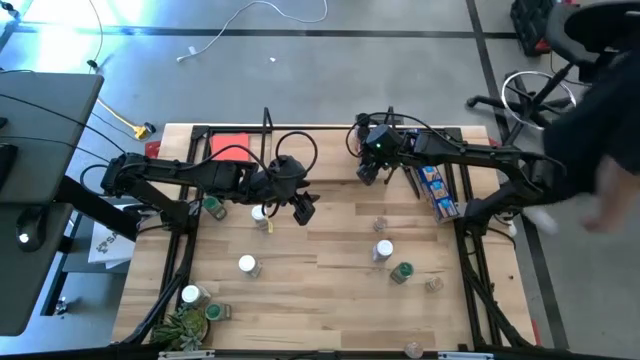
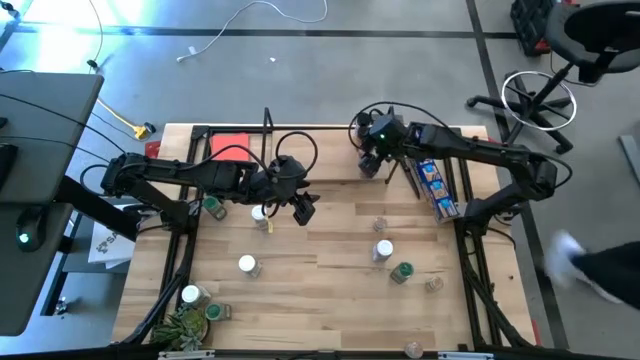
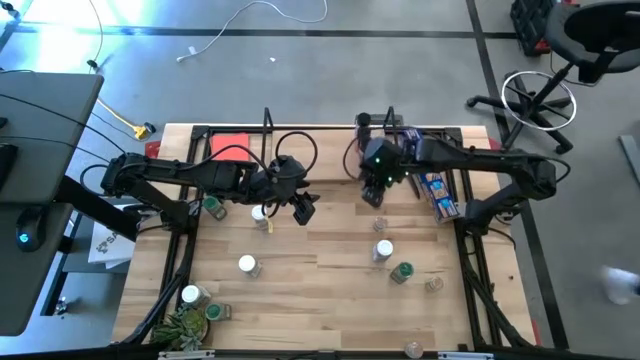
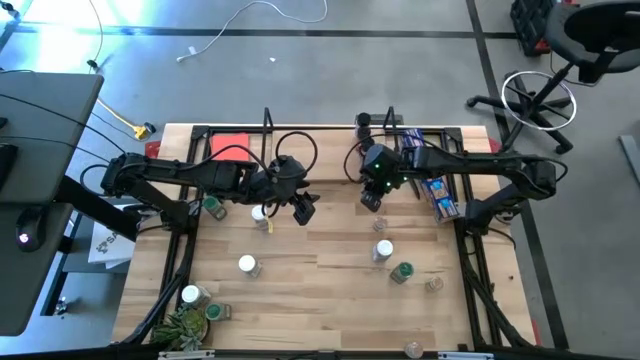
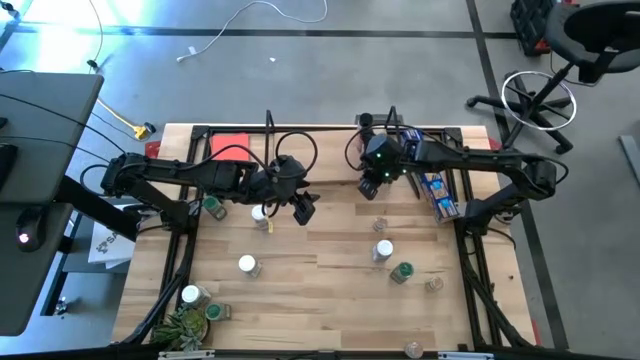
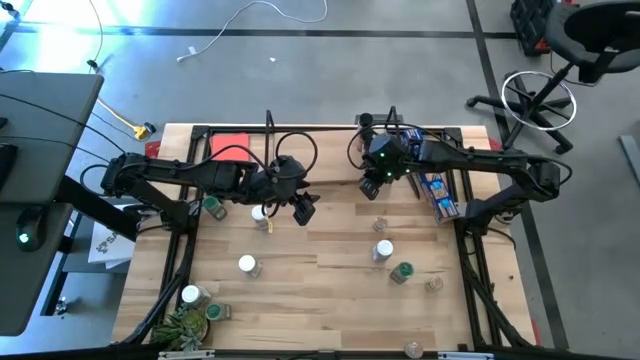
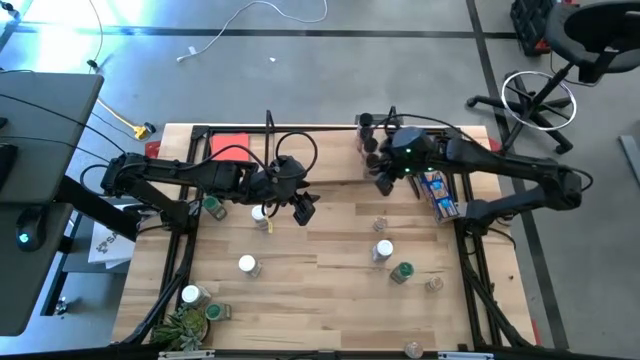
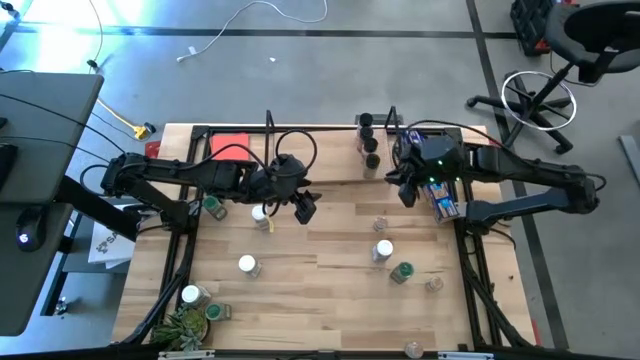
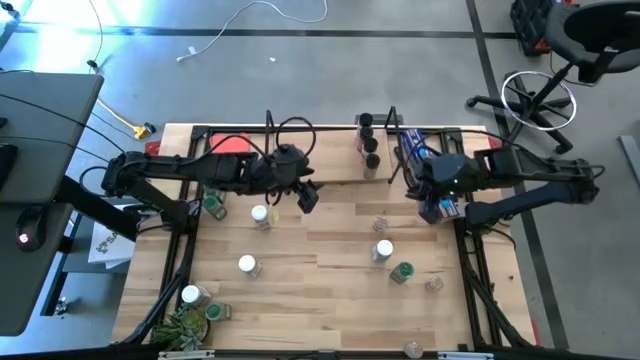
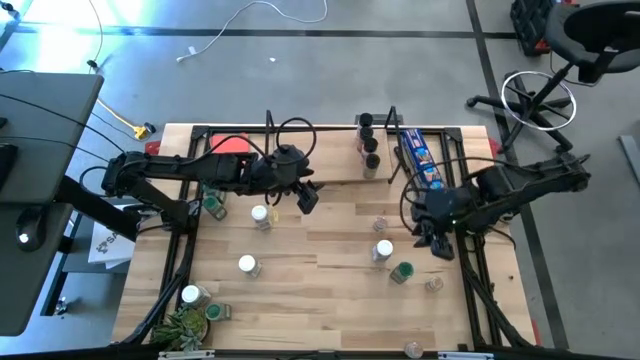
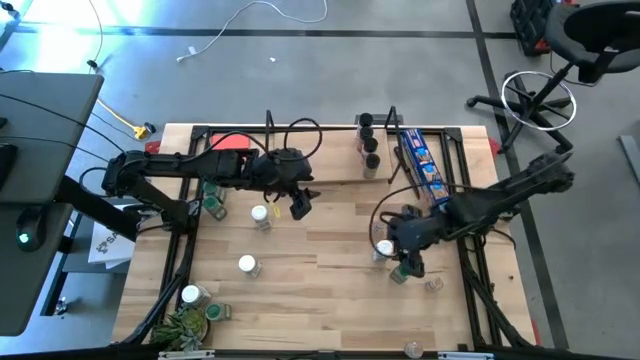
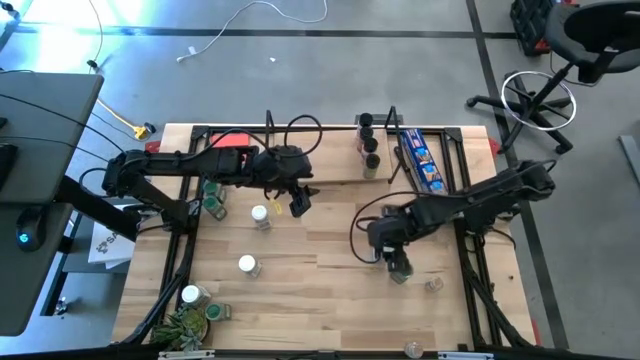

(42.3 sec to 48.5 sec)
Task: Shelf spices
Put the middle right white seasoning bottle on the shelf

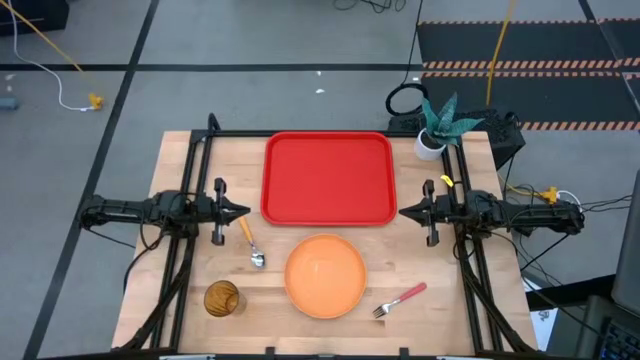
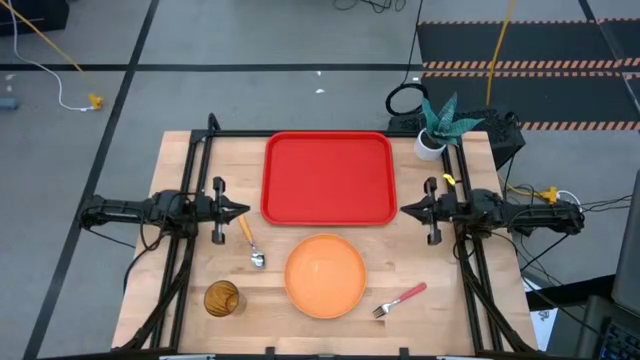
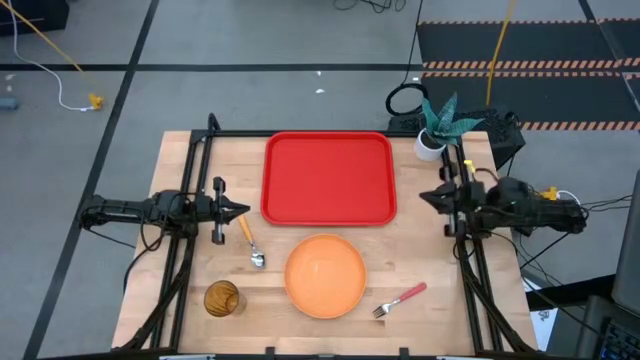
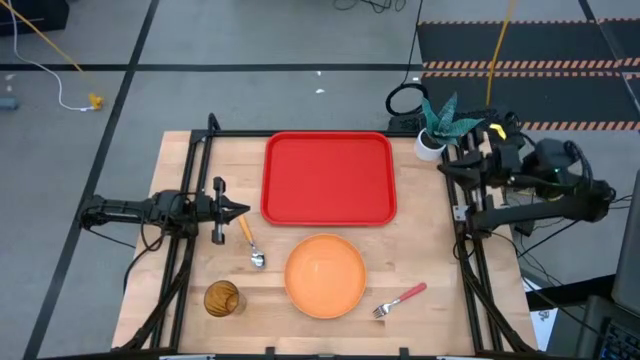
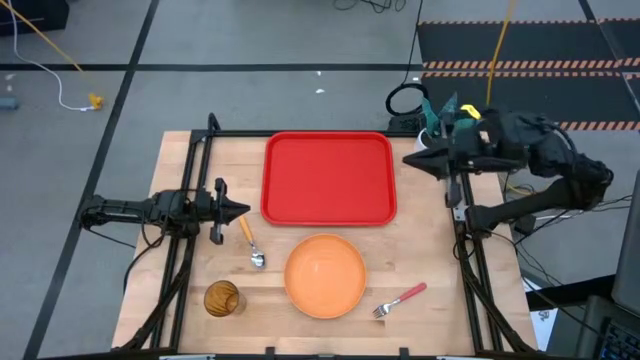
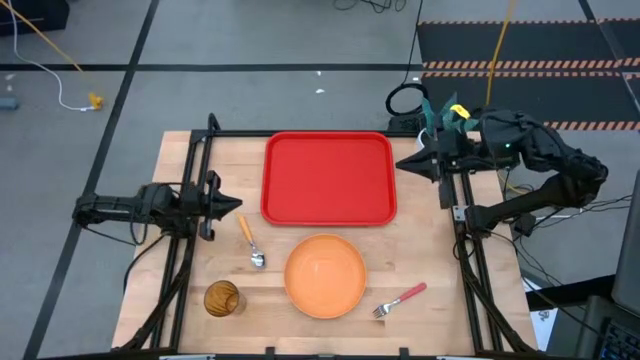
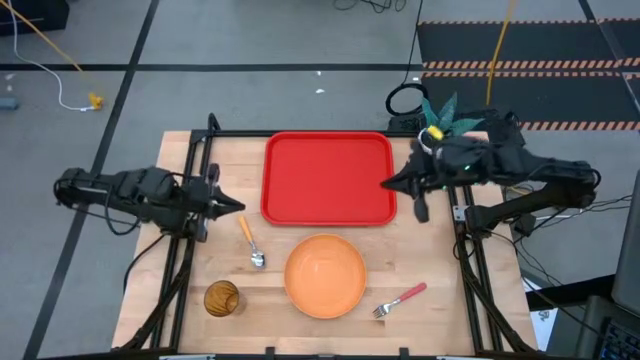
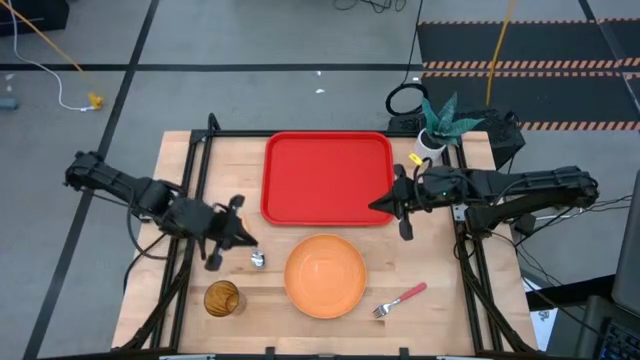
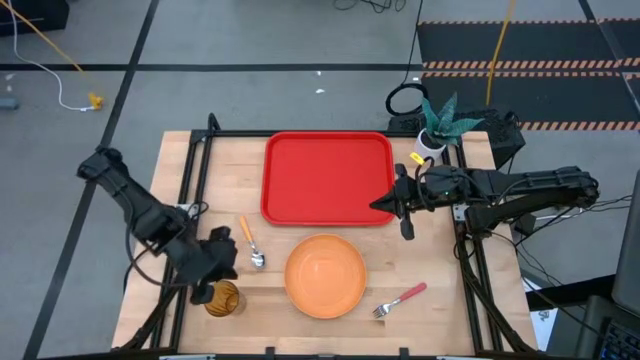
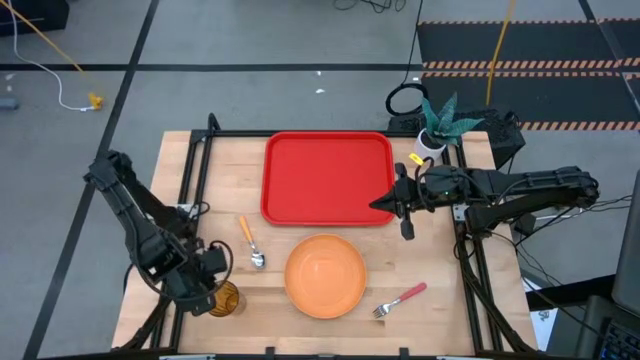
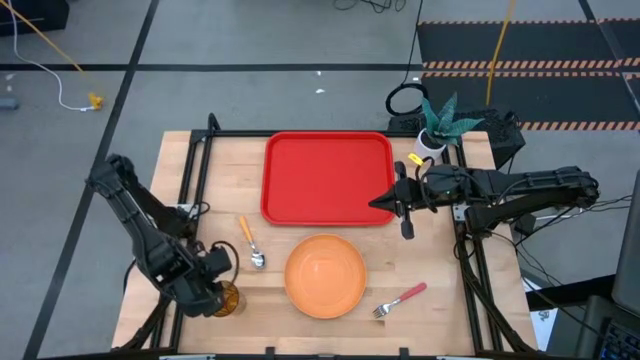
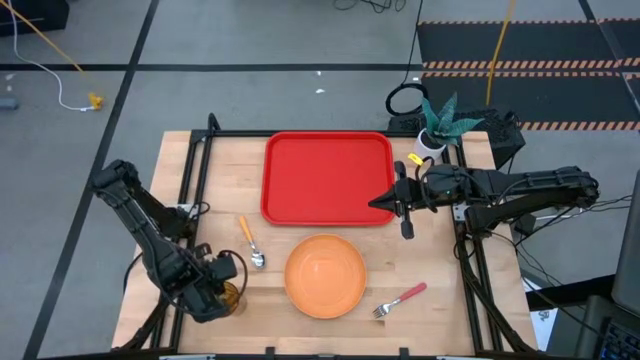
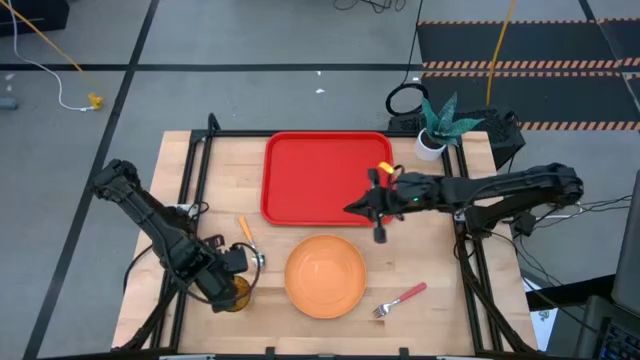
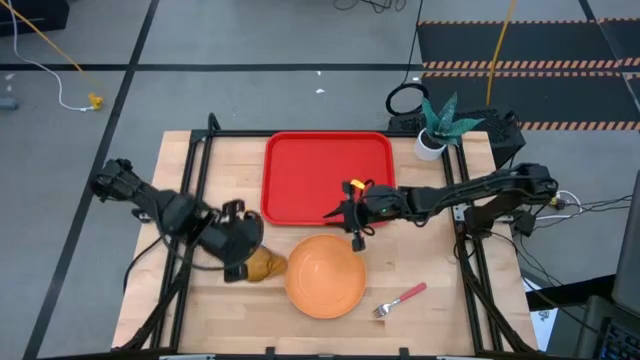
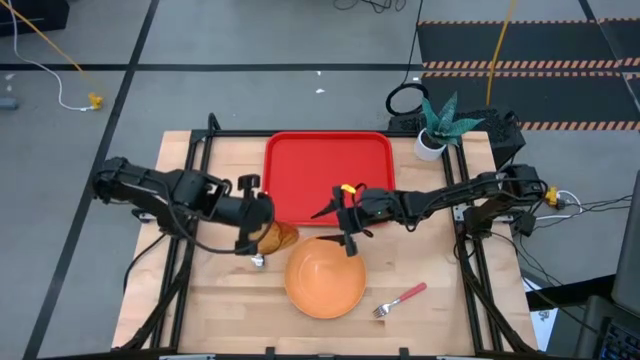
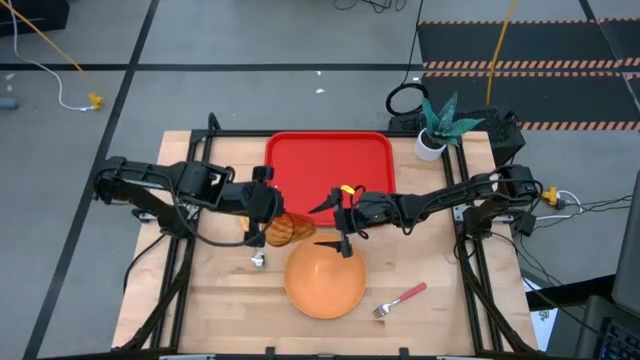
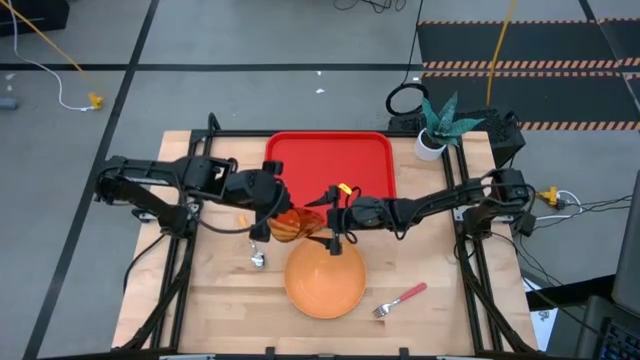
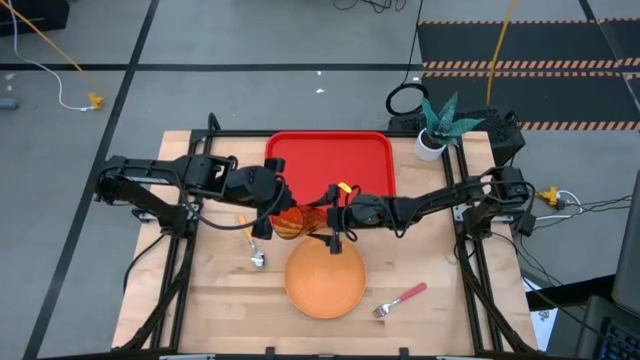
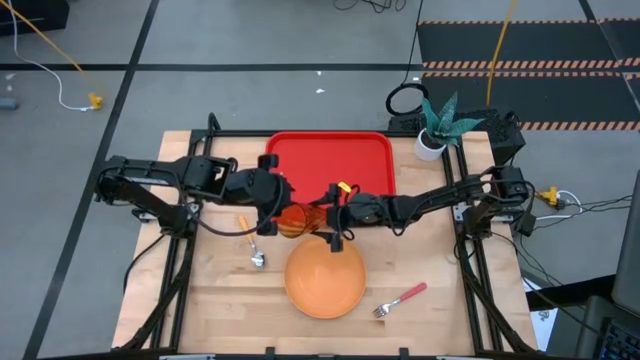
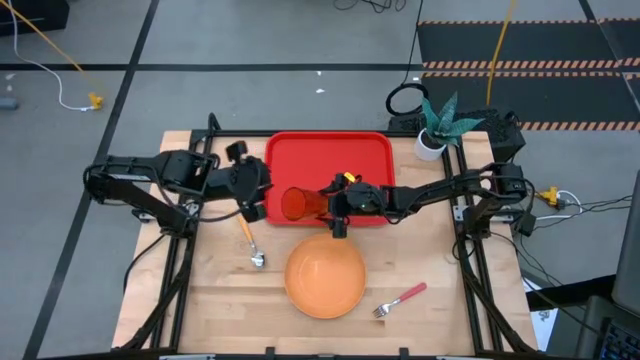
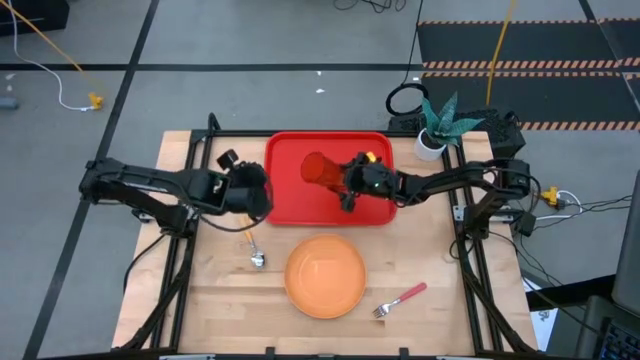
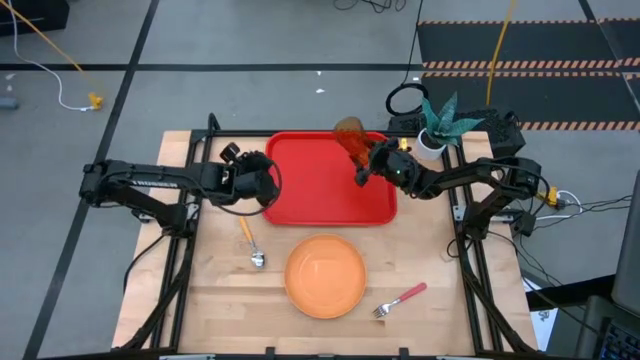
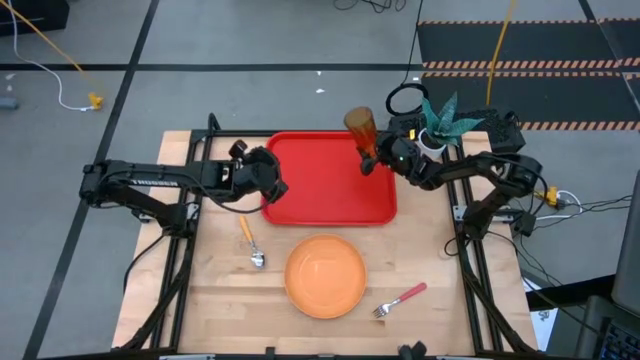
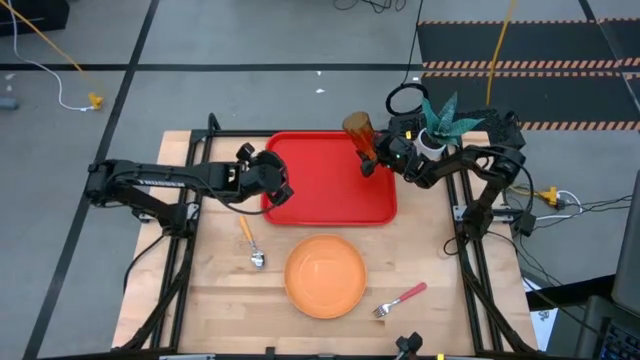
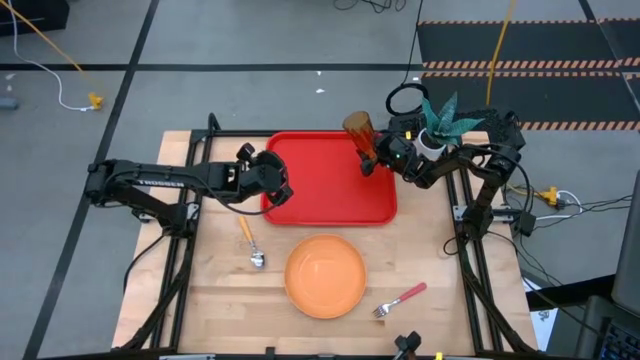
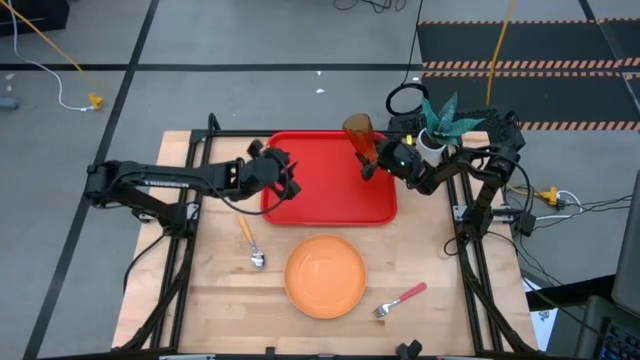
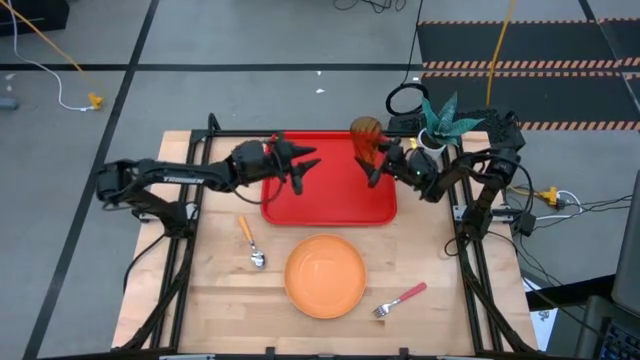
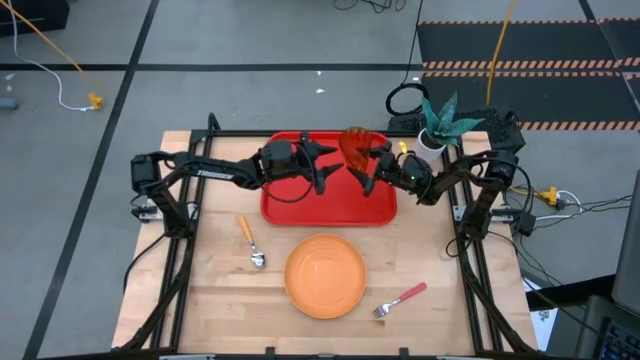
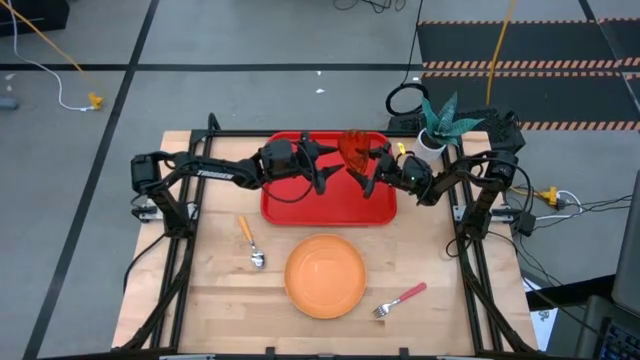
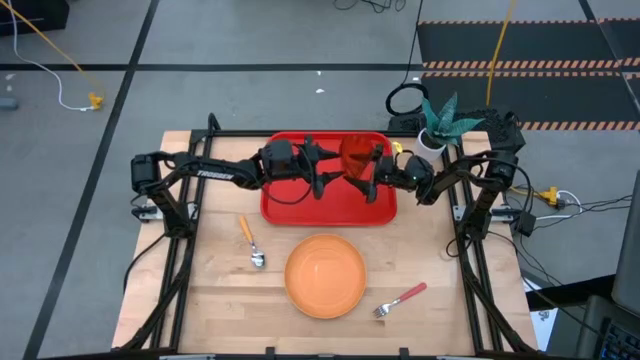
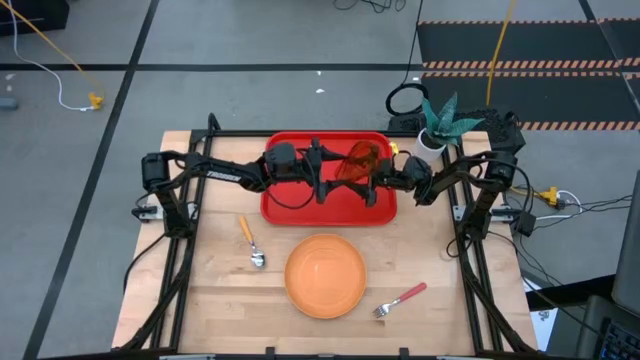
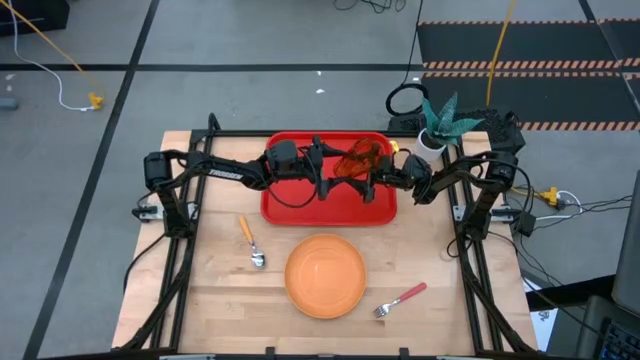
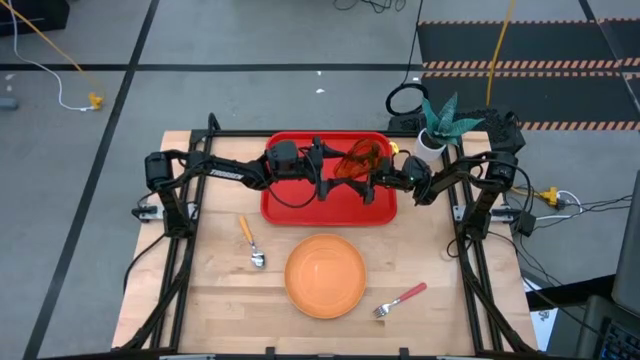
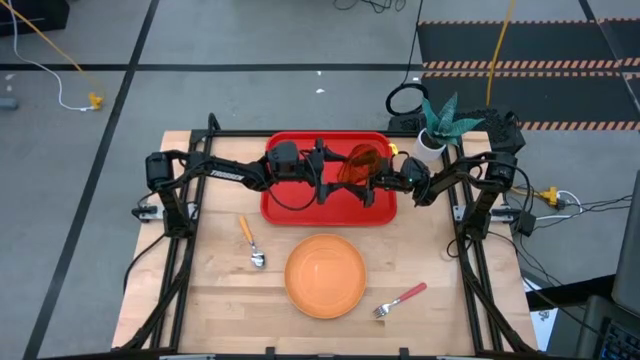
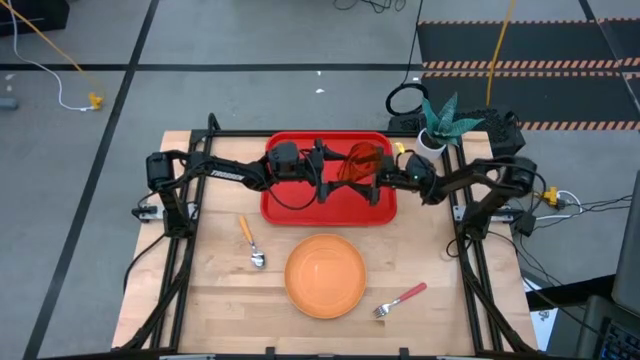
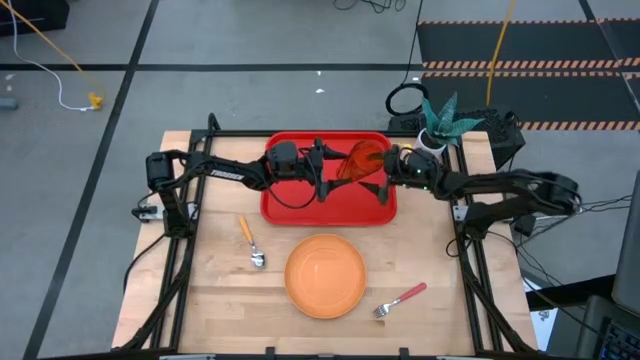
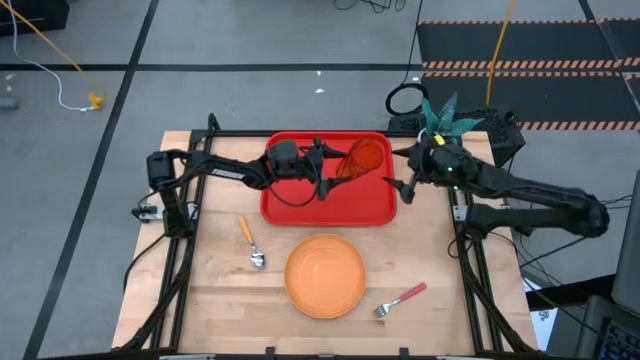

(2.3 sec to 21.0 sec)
Task: Pick and place plate/cup/fork/spoon on tray
Put the brown cup on the red serving tray
